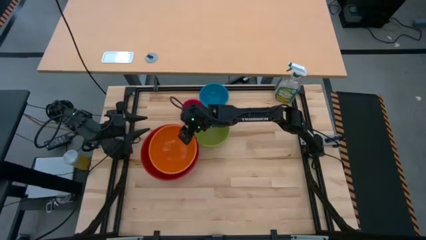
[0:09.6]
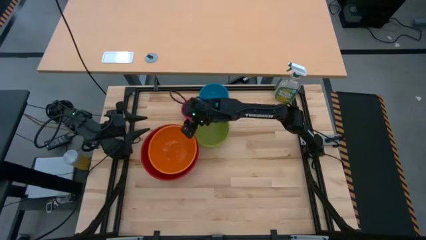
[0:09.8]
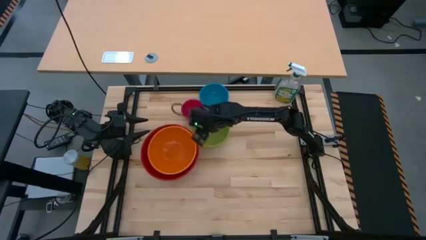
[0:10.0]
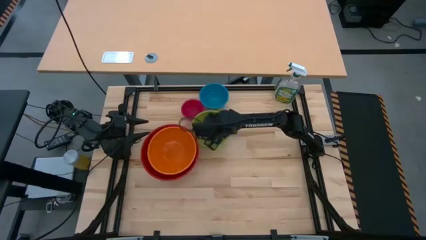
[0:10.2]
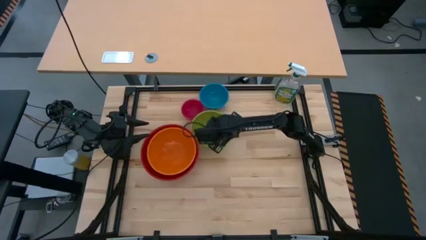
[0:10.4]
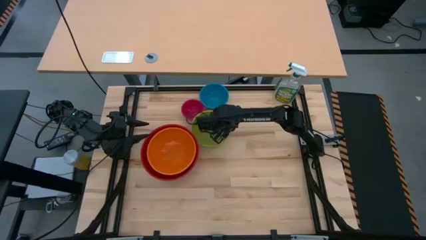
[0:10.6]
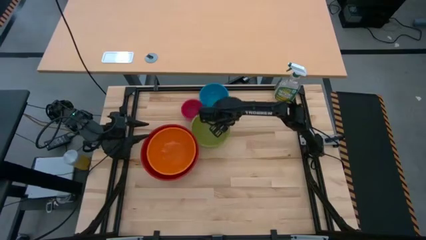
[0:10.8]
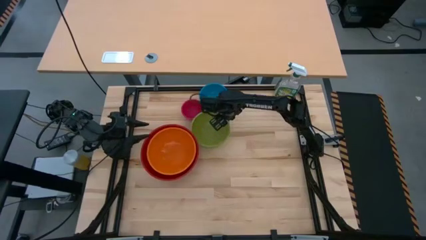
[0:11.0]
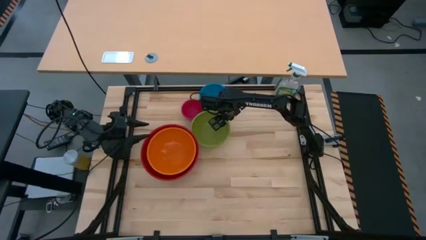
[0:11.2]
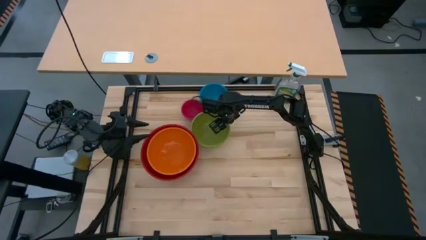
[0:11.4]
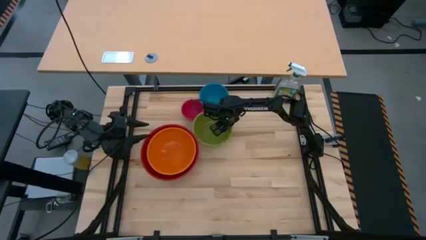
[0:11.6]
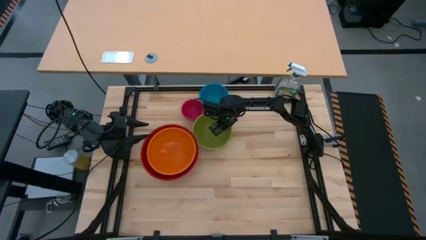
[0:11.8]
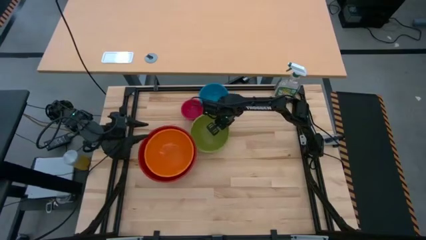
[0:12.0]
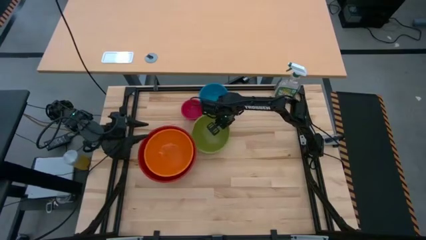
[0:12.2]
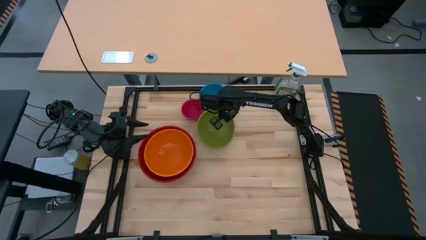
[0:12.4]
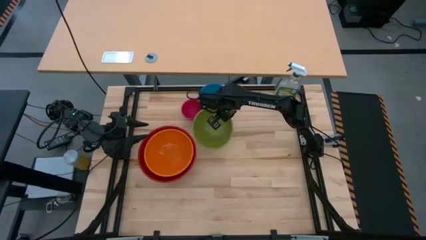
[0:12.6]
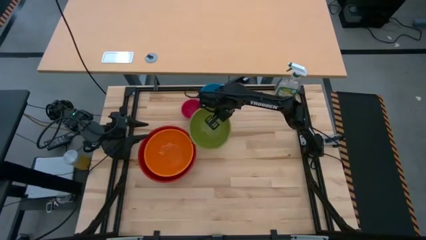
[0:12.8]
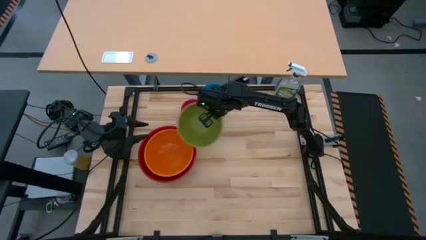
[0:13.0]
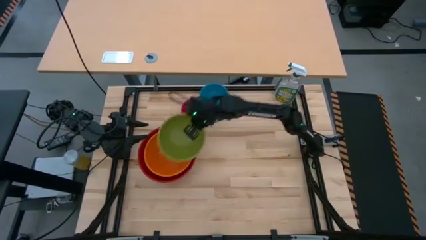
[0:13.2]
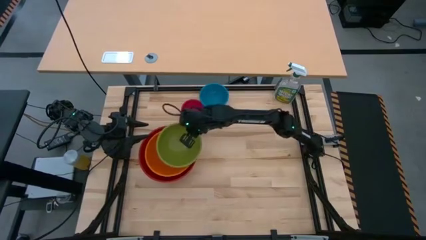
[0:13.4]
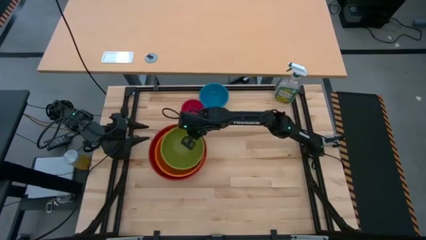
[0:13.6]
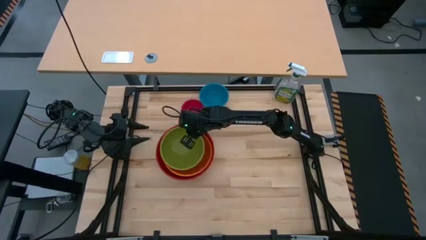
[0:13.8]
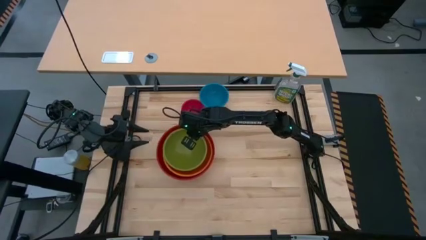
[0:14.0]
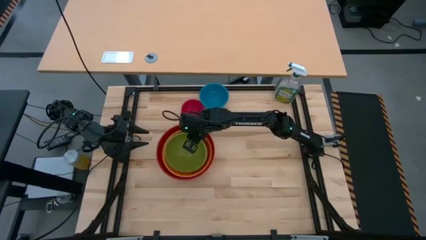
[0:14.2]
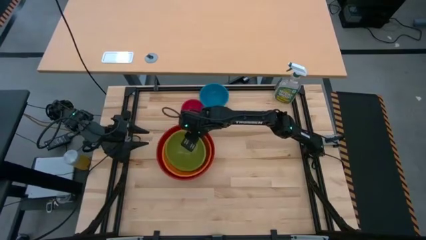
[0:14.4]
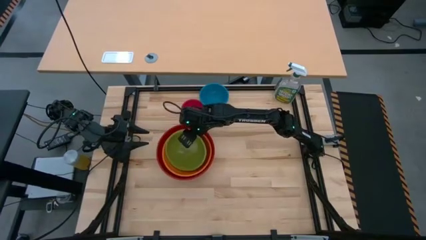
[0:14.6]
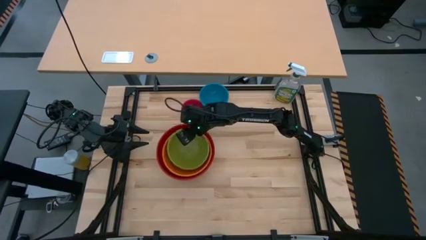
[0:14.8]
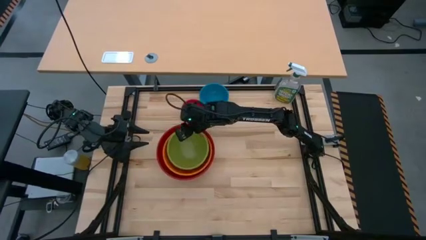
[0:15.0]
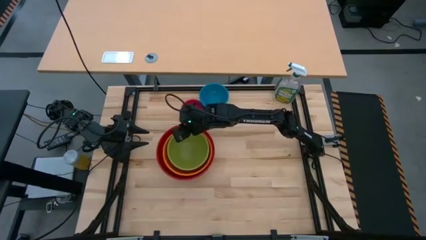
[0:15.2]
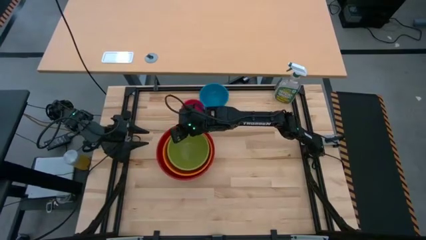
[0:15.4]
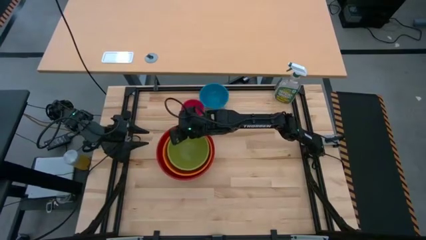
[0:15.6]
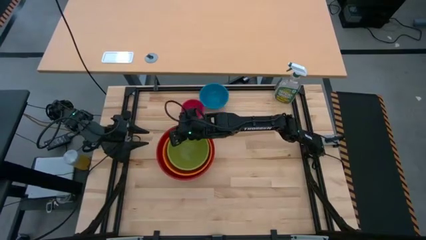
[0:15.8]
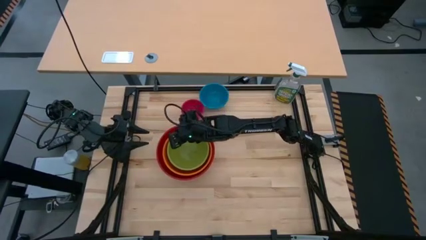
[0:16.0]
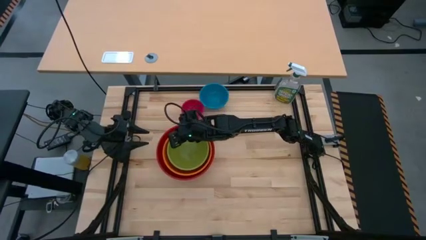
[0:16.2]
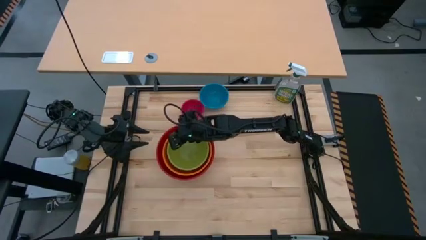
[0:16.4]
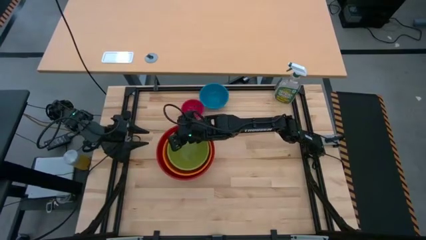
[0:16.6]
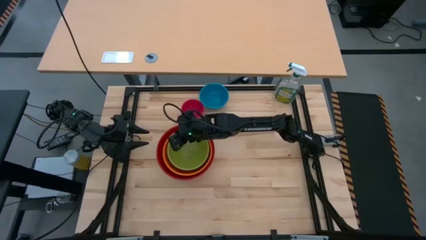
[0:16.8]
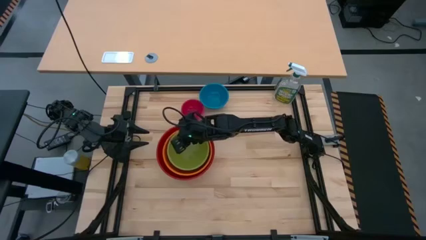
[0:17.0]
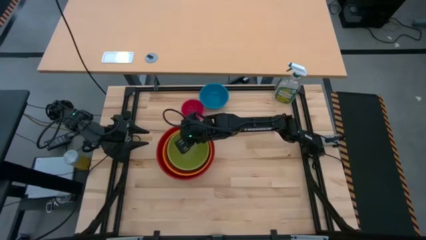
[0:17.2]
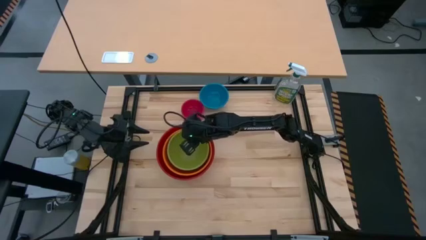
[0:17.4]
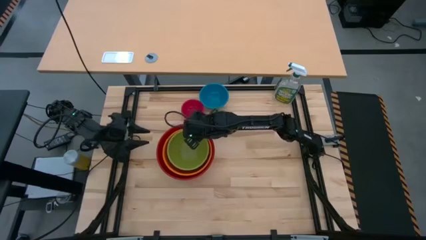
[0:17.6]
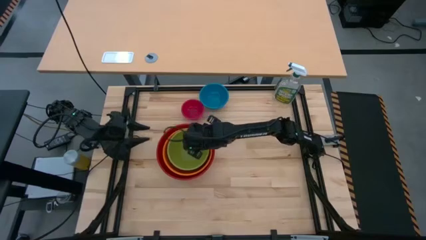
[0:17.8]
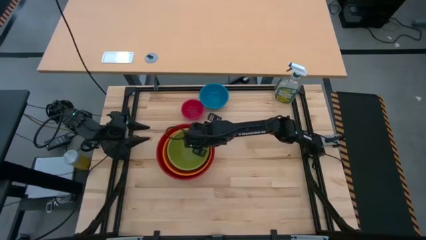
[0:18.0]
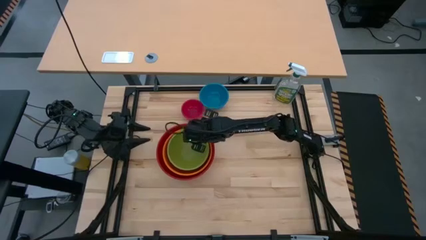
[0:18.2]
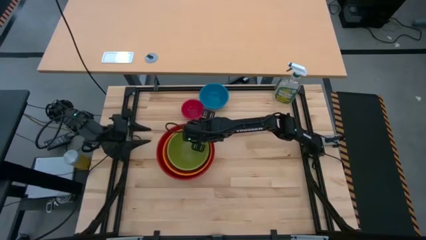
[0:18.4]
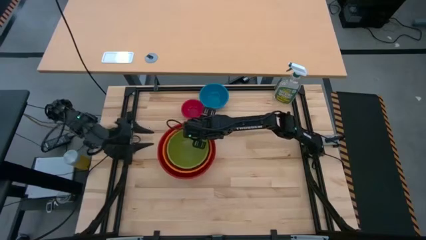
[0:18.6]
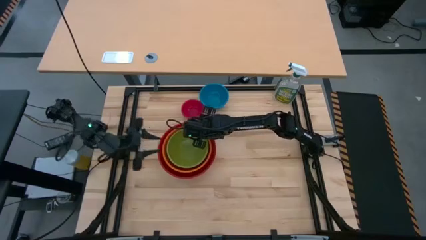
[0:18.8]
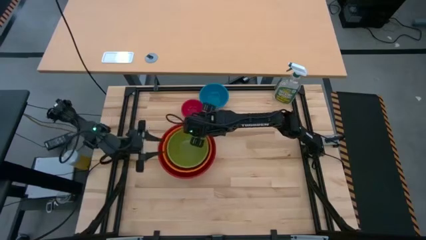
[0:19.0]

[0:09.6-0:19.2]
Stack the green bowl on top of the orange bowl

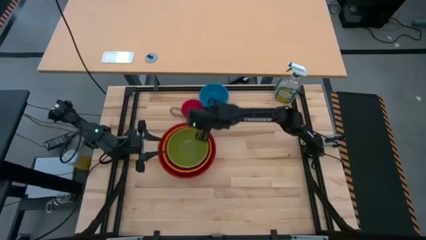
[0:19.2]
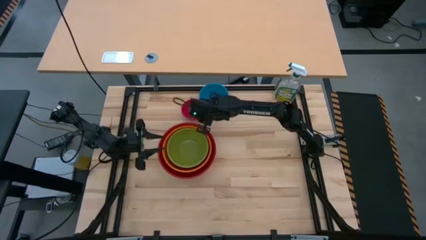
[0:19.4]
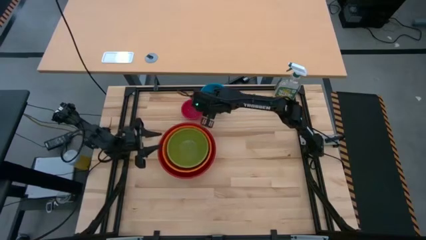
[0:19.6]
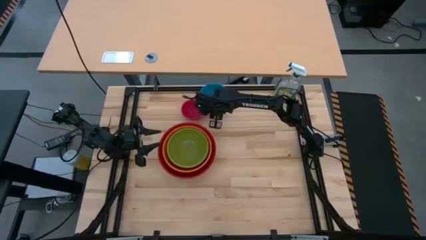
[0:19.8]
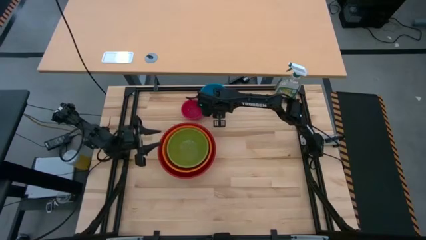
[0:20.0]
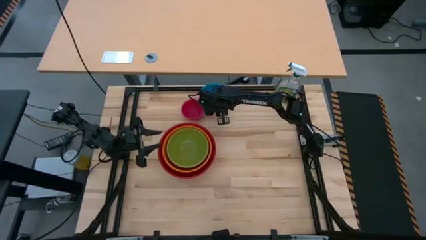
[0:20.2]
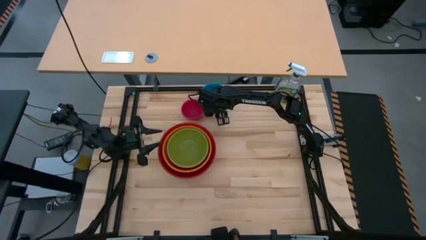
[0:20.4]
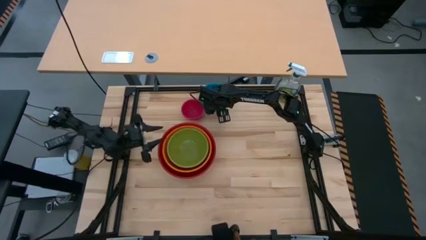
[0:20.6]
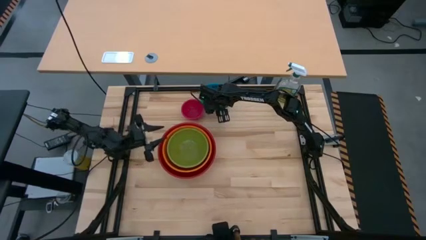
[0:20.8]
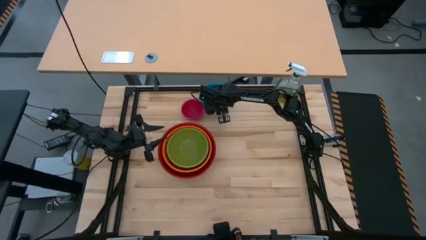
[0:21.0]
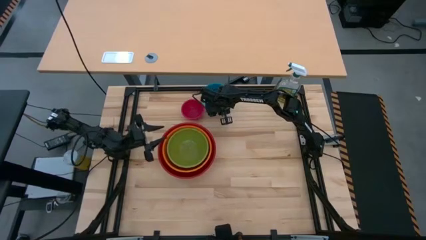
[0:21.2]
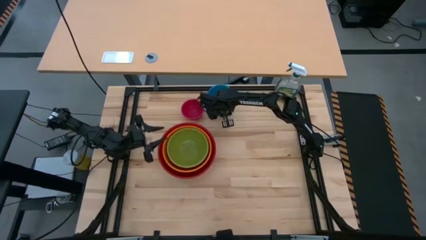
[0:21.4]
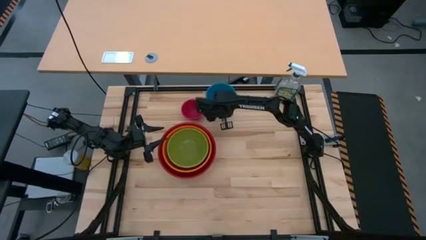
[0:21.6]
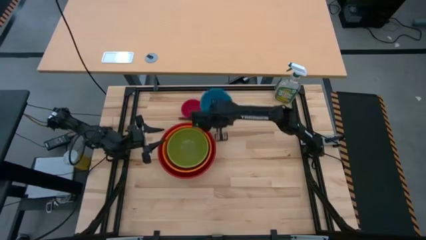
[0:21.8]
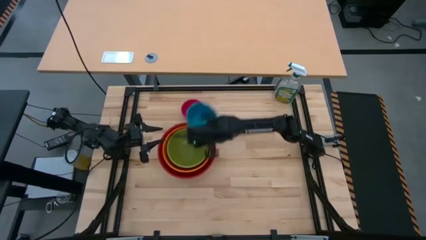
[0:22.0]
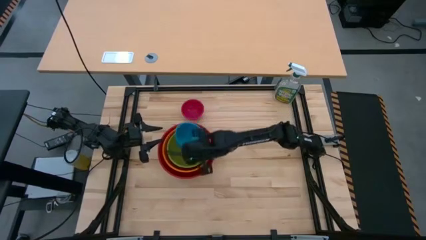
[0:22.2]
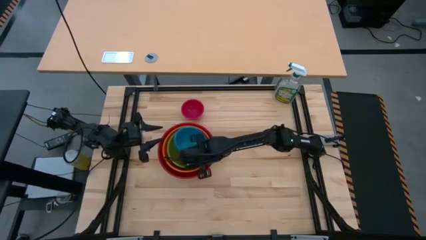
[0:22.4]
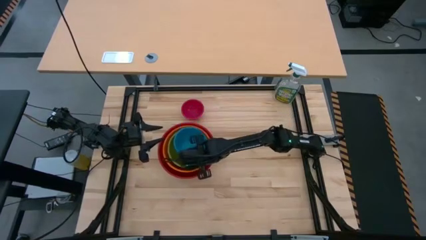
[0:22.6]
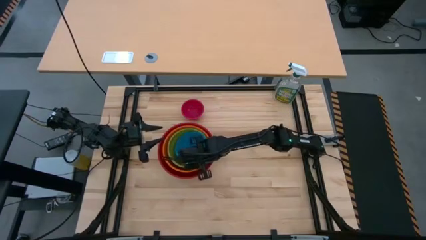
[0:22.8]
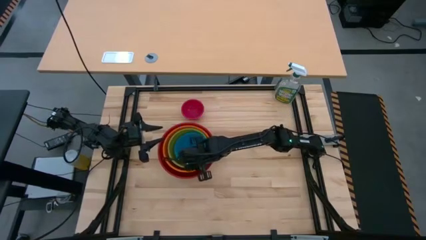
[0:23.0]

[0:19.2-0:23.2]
Stack the blue bowl on top of the green bowl
